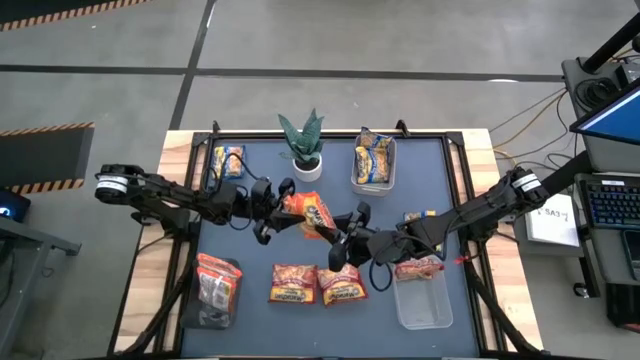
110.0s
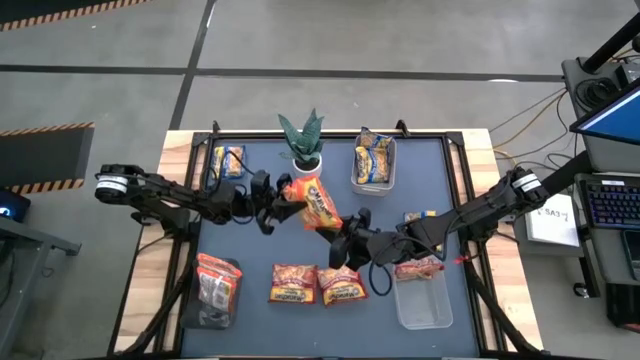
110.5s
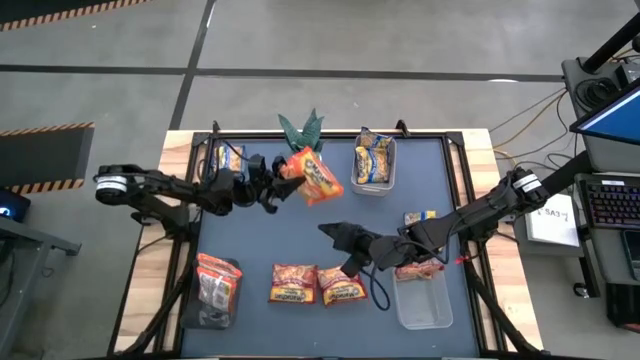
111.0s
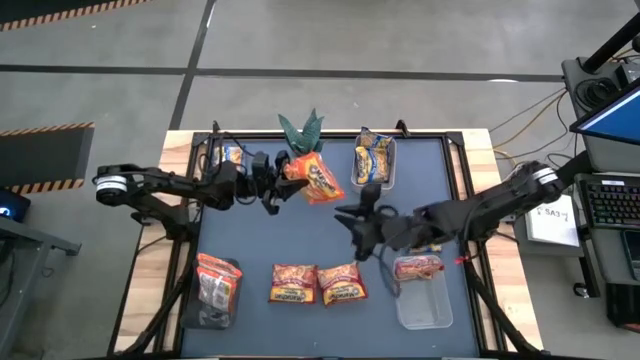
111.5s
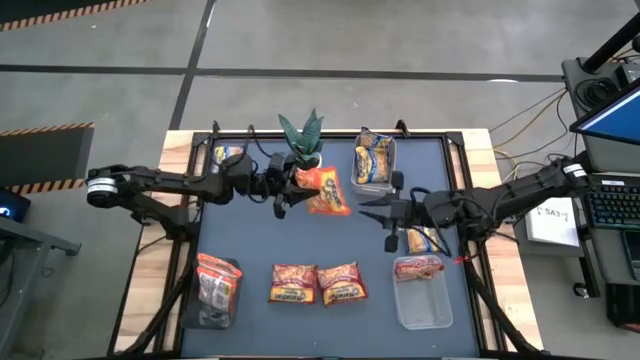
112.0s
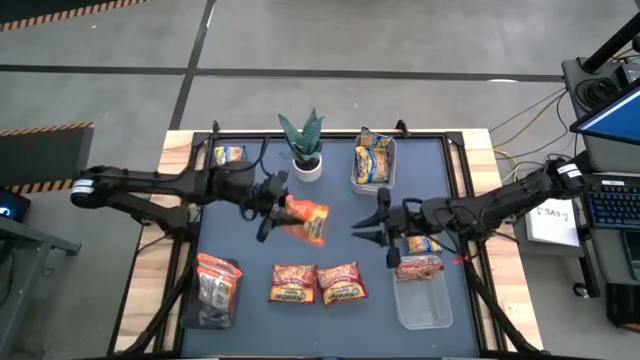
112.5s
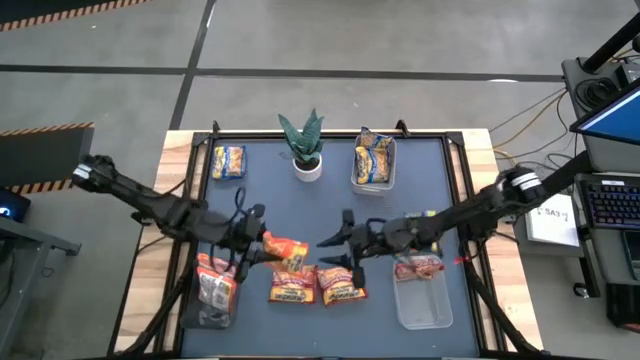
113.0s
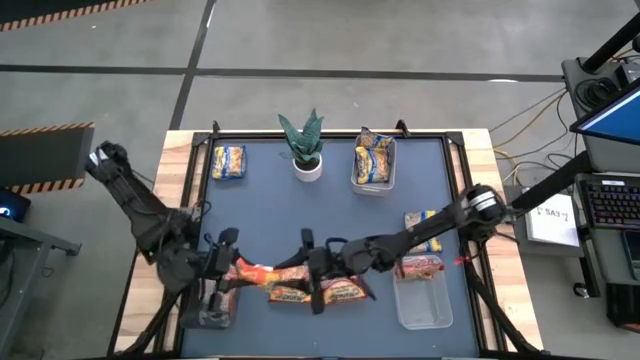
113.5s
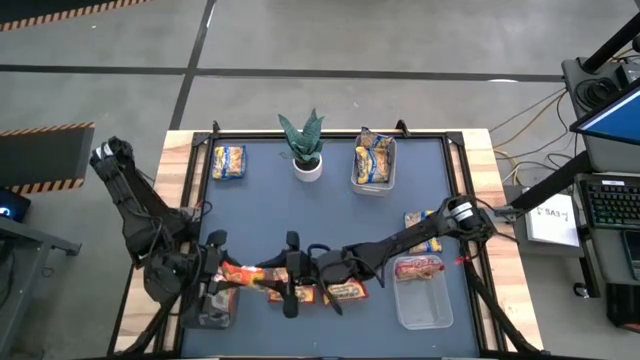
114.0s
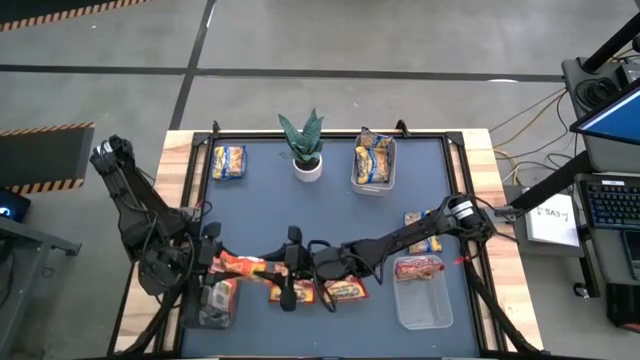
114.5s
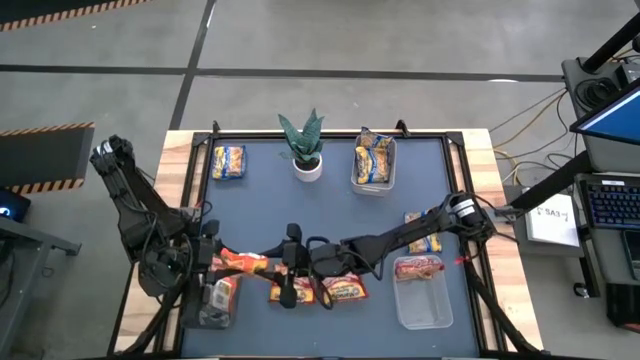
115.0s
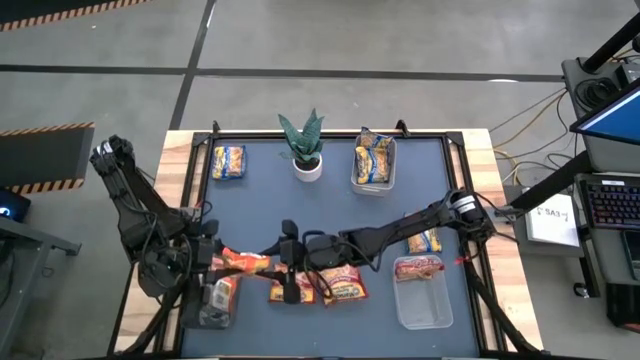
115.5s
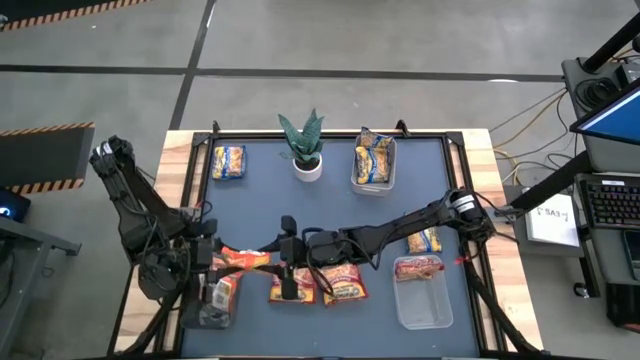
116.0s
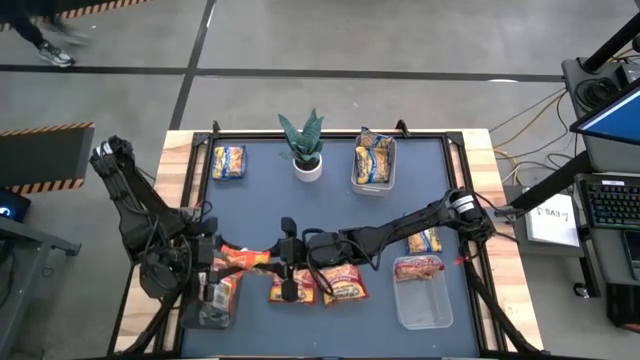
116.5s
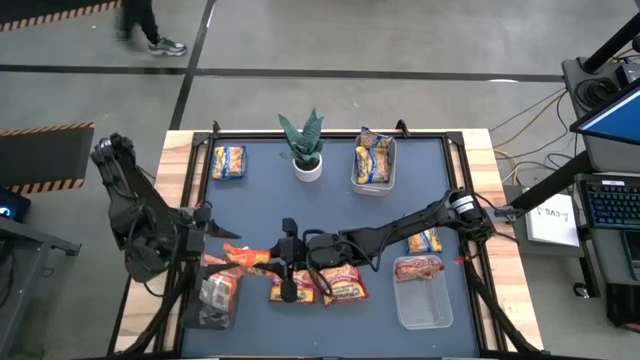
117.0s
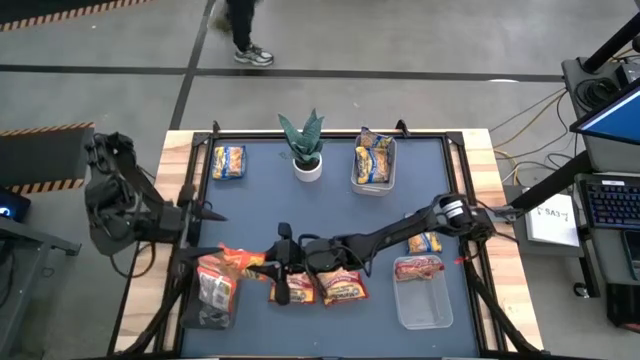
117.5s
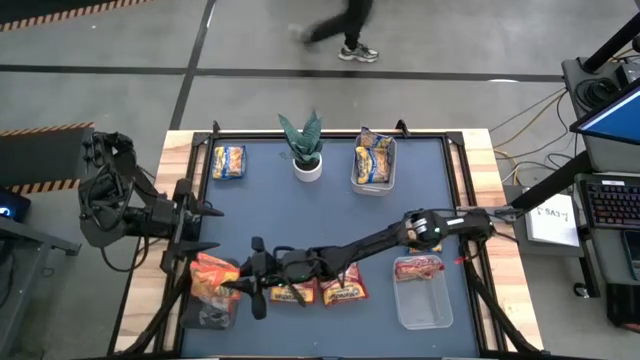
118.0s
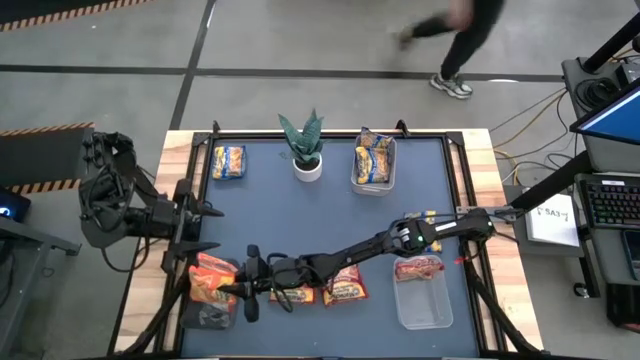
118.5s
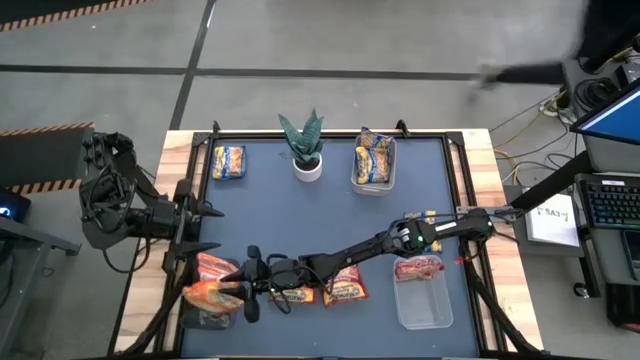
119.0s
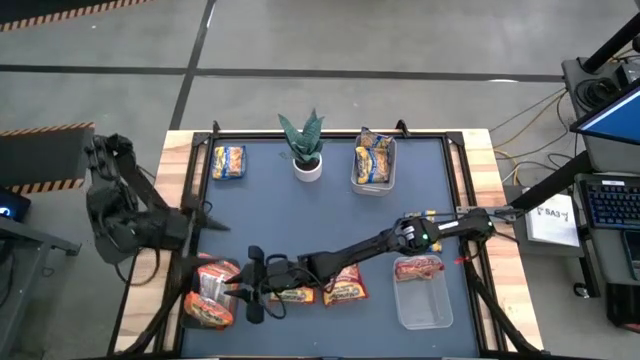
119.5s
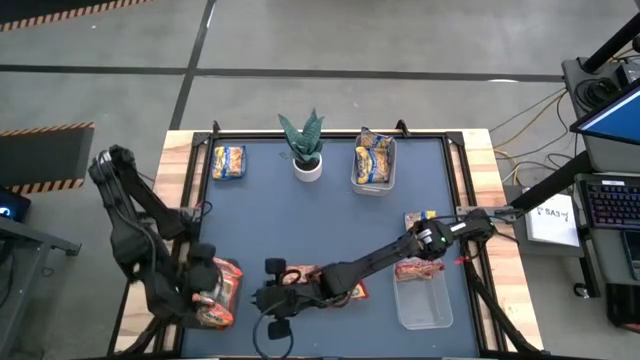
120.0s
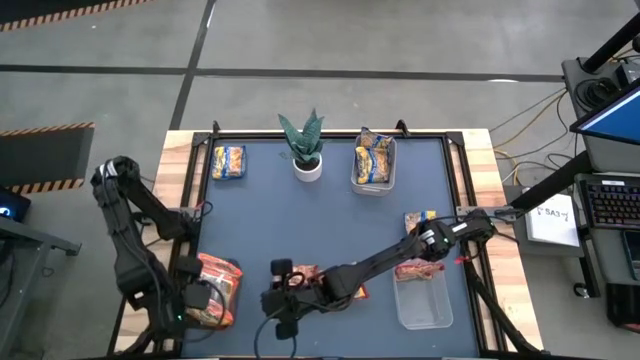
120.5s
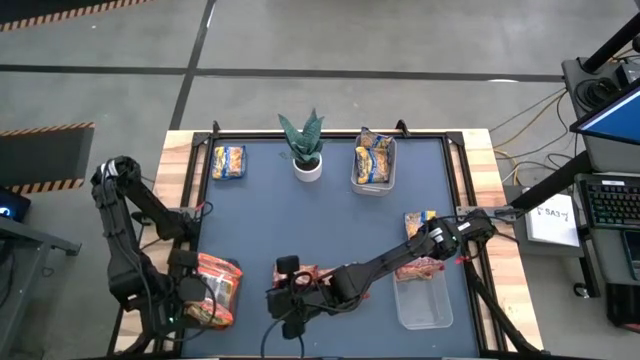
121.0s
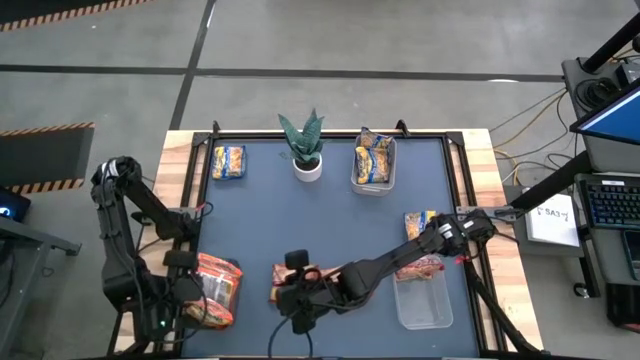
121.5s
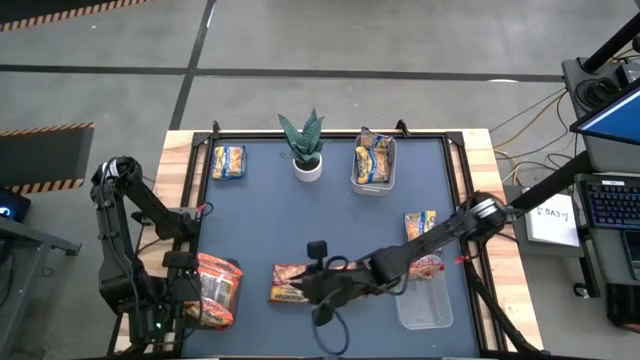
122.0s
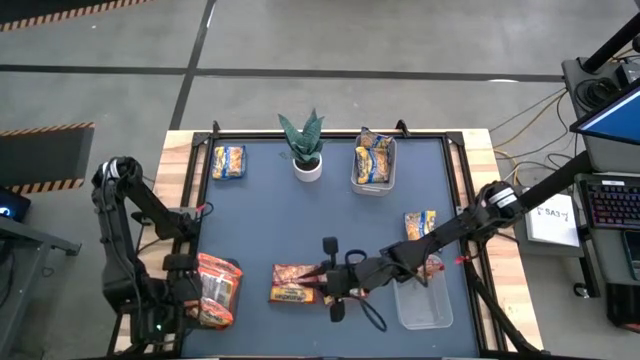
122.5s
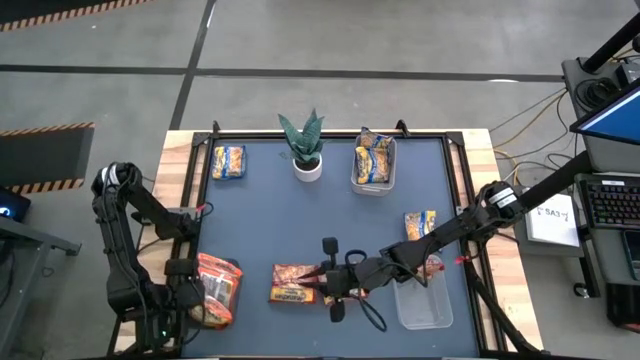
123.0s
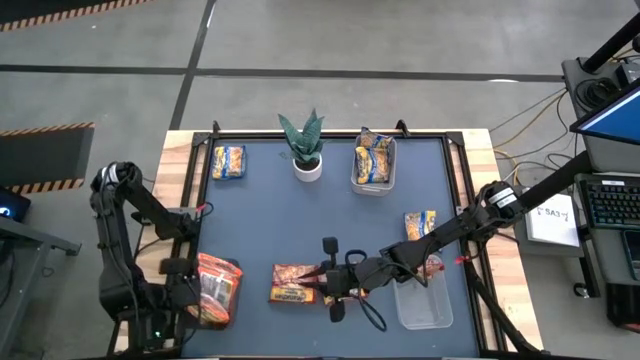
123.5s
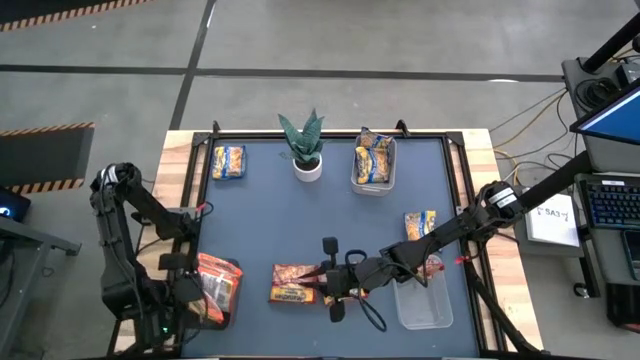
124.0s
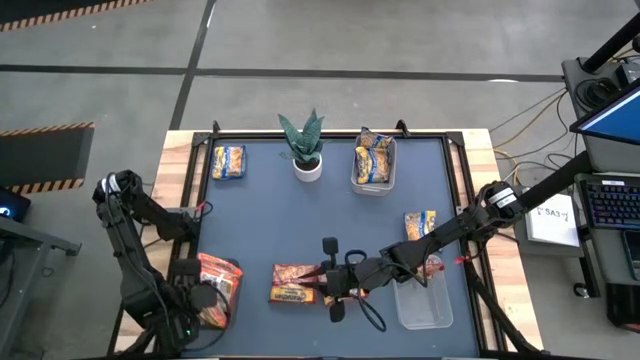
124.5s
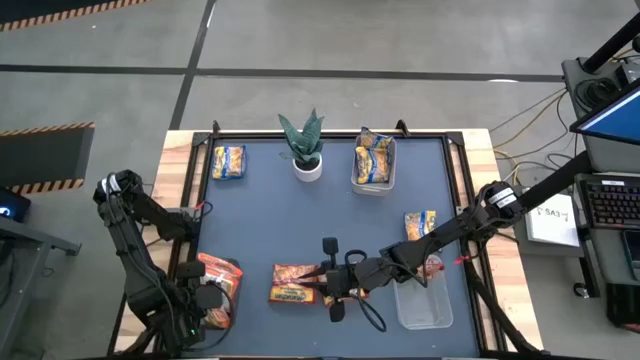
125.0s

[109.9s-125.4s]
Task: Sort Maruchan noodles
Put the orange instant noodle pack into the gray bin

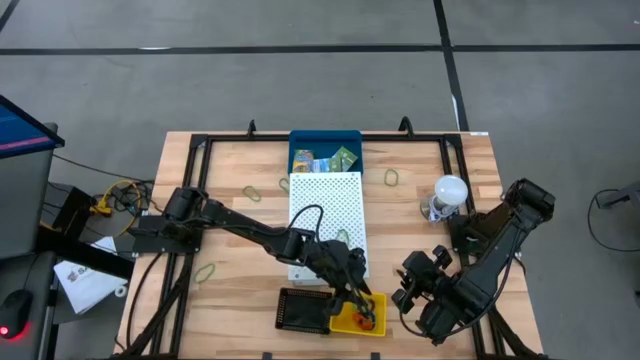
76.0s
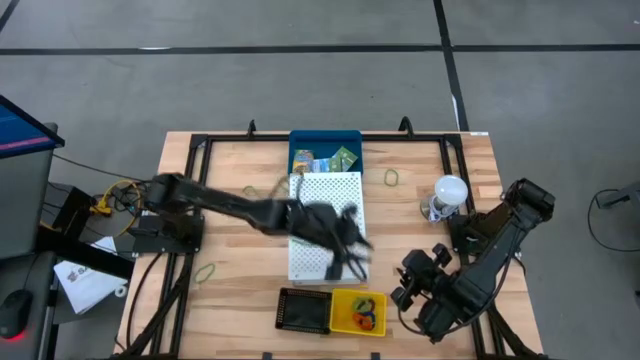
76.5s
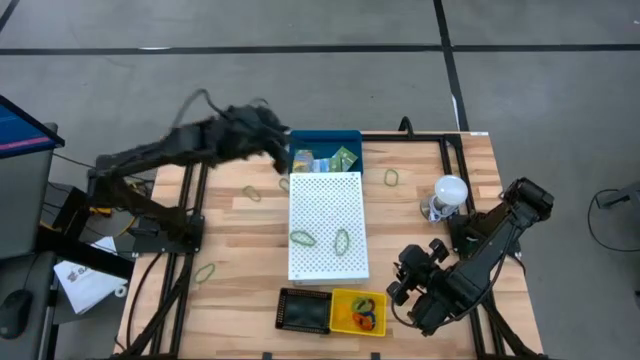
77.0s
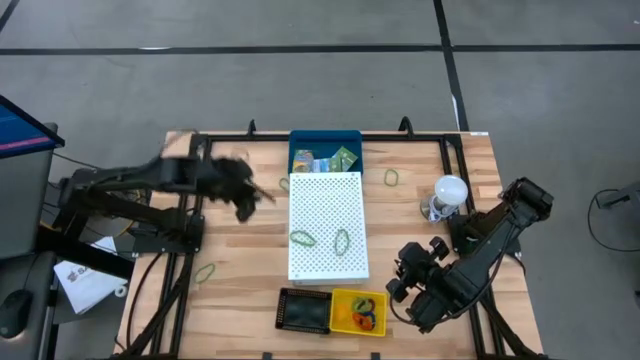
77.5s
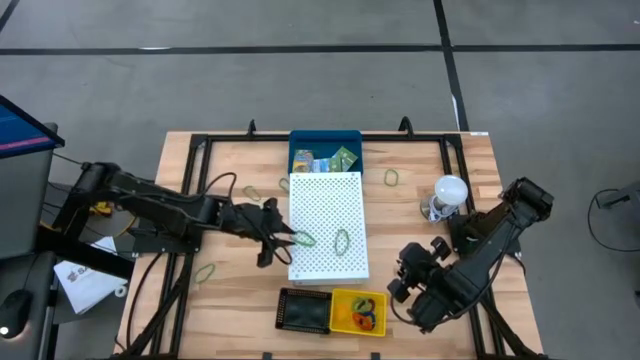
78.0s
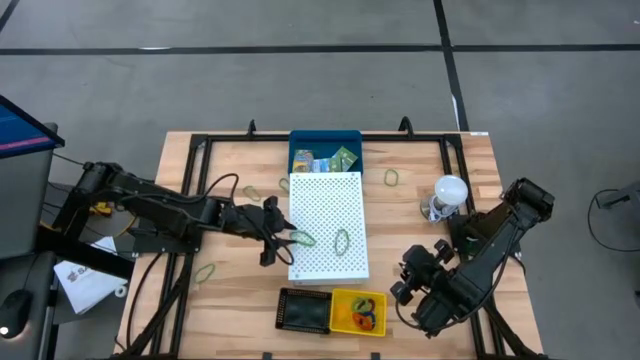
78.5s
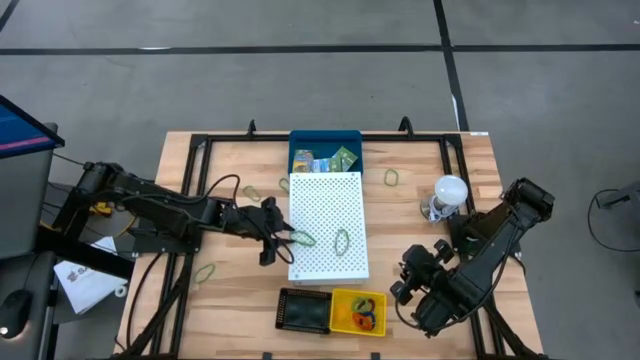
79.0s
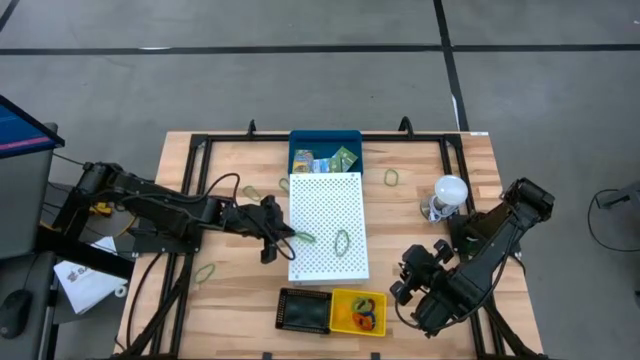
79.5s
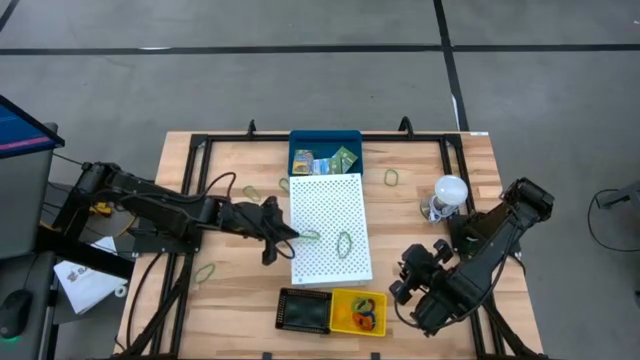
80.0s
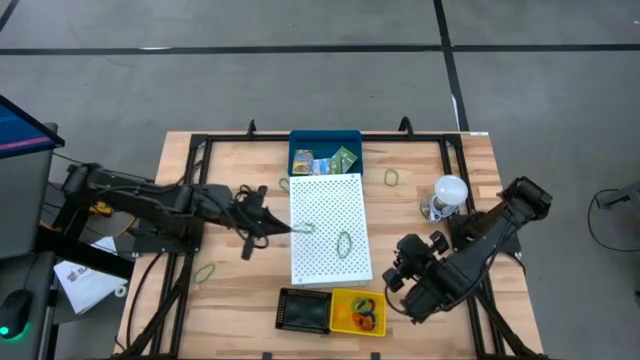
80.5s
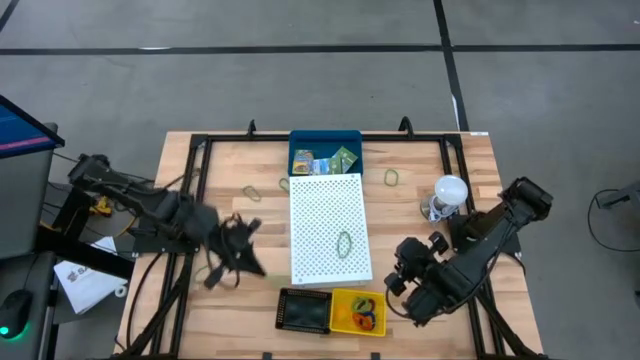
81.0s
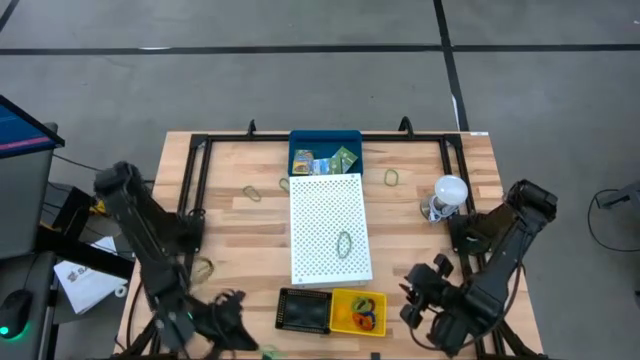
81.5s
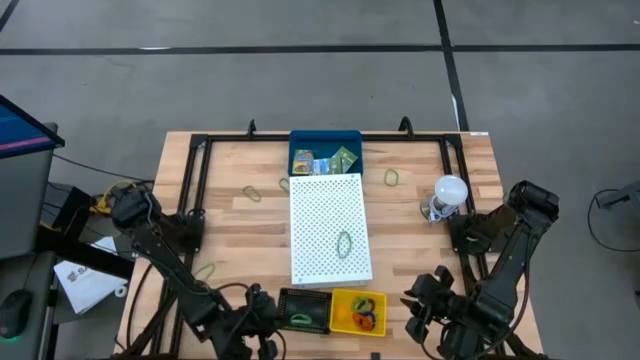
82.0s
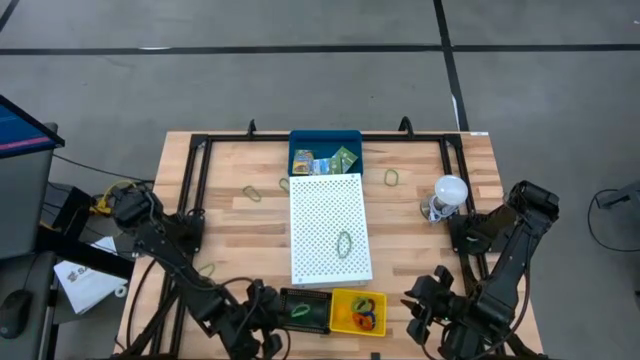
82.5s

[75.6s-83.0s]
Task: Pick & Place Office Desk Supplies
Put the green rubber band into the black bin
